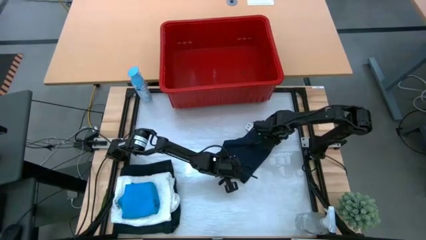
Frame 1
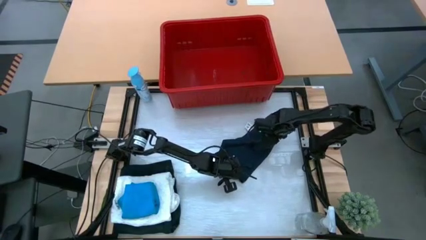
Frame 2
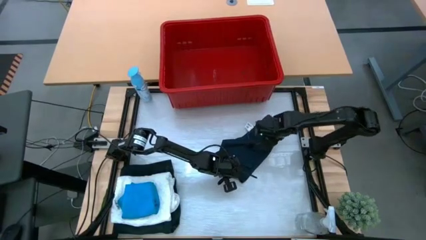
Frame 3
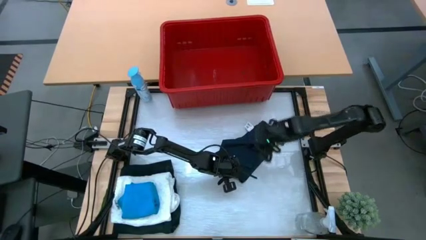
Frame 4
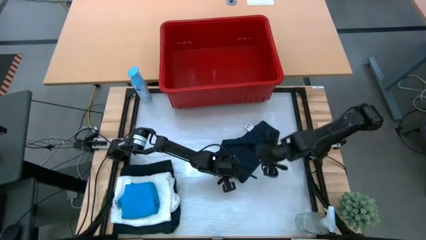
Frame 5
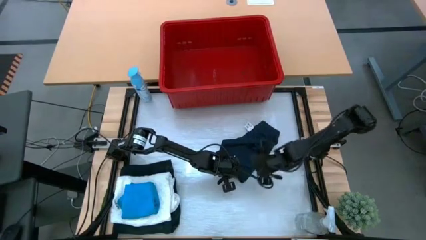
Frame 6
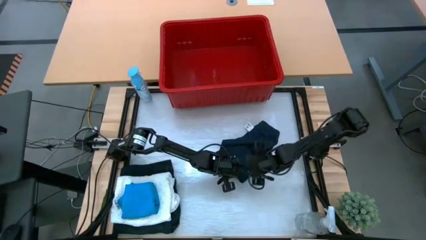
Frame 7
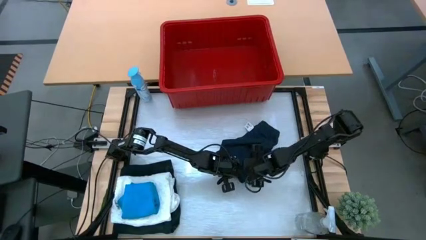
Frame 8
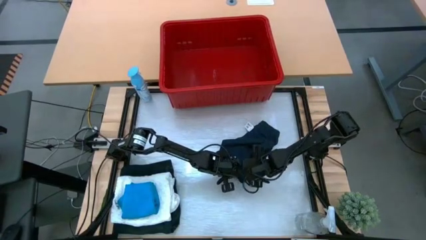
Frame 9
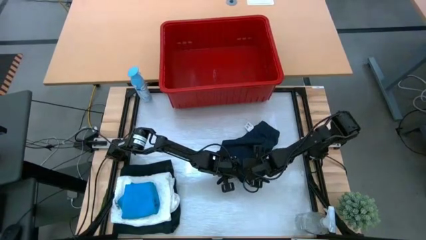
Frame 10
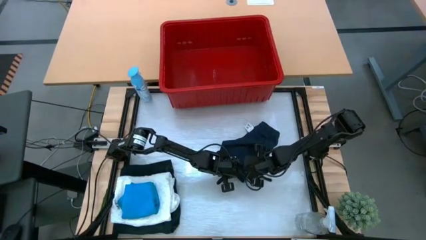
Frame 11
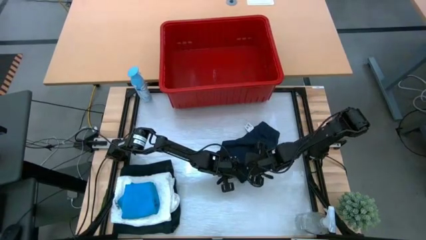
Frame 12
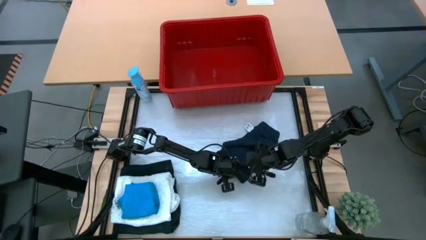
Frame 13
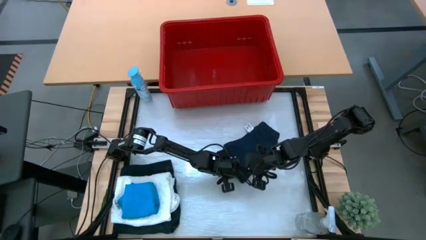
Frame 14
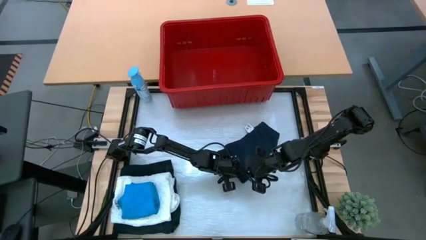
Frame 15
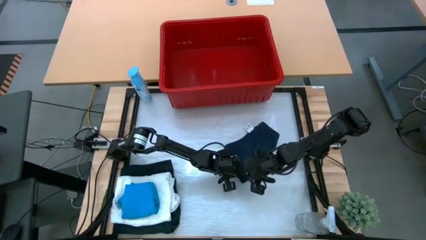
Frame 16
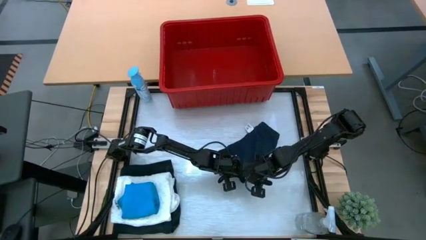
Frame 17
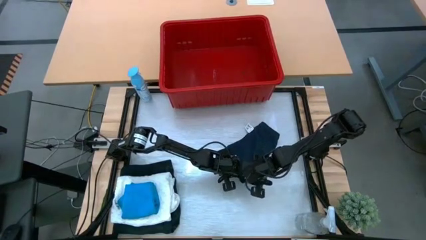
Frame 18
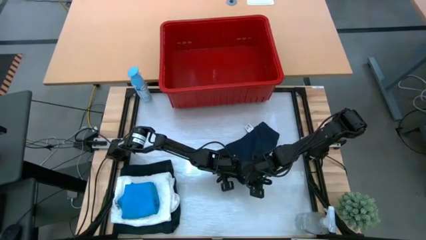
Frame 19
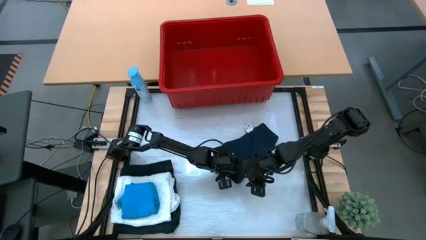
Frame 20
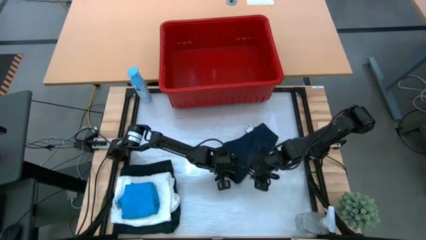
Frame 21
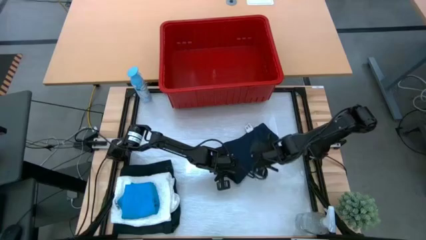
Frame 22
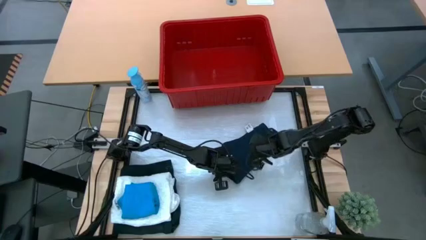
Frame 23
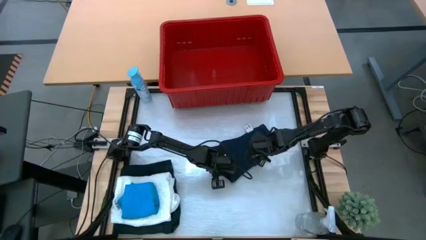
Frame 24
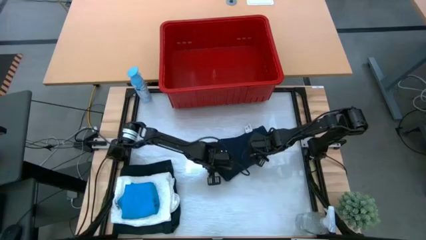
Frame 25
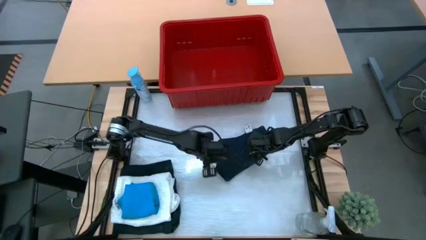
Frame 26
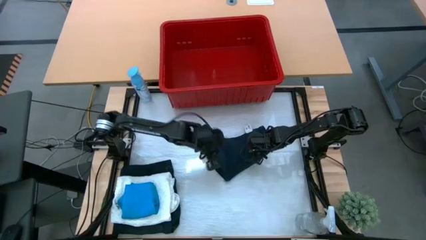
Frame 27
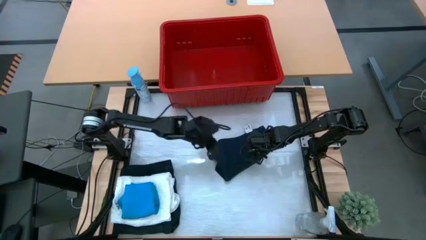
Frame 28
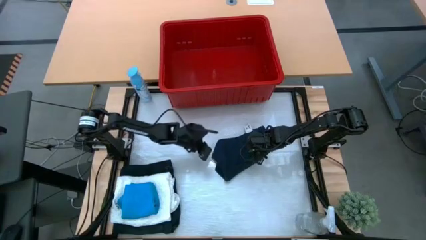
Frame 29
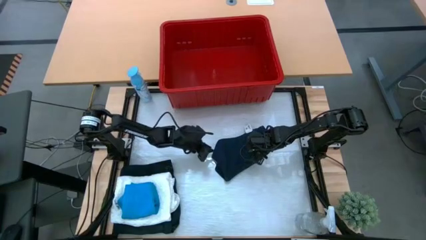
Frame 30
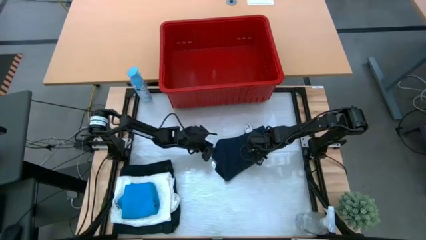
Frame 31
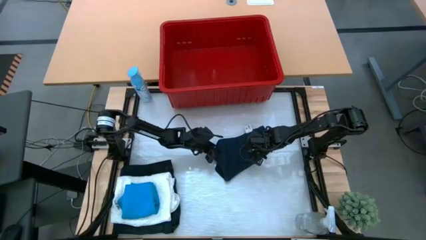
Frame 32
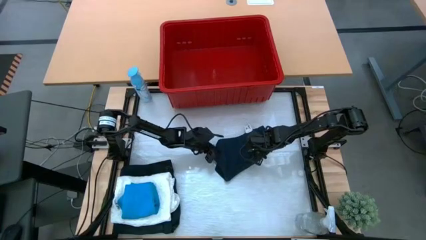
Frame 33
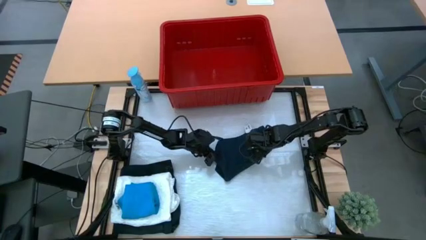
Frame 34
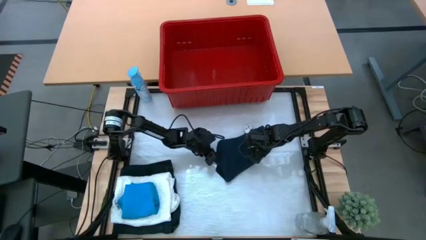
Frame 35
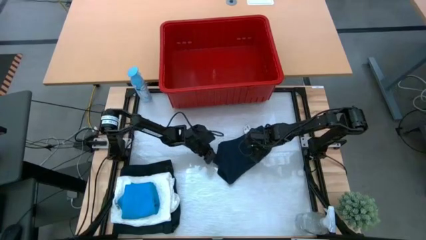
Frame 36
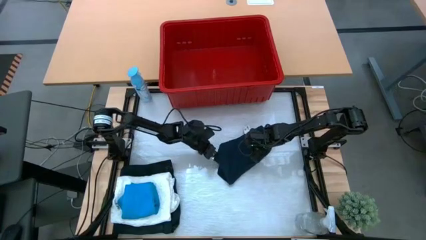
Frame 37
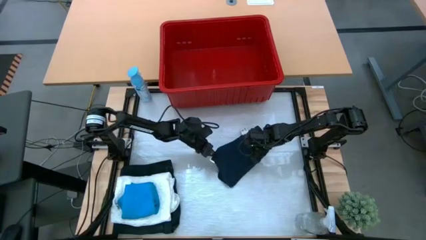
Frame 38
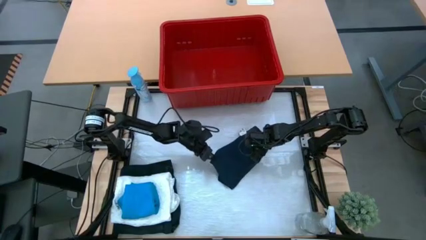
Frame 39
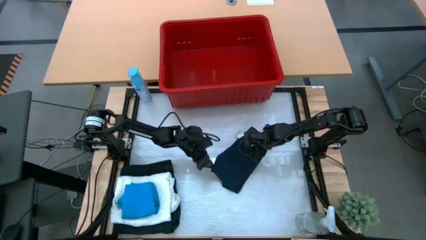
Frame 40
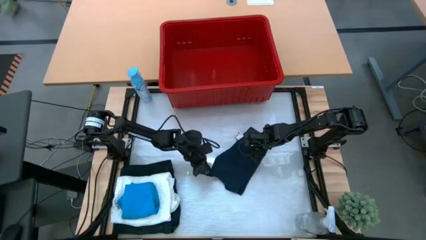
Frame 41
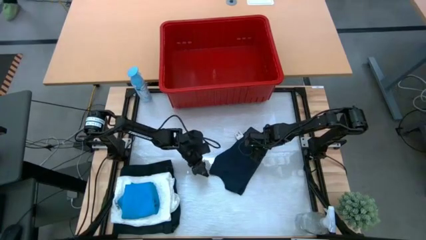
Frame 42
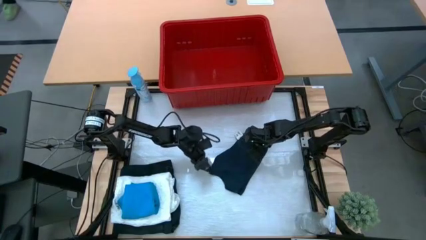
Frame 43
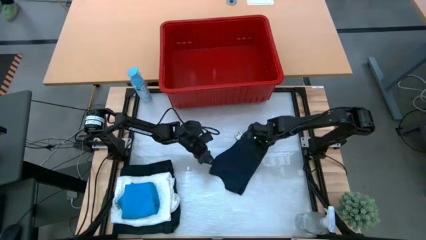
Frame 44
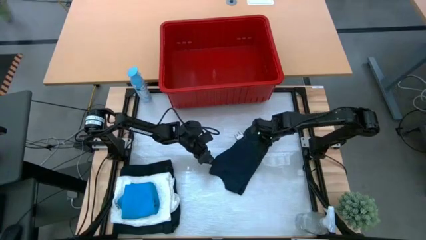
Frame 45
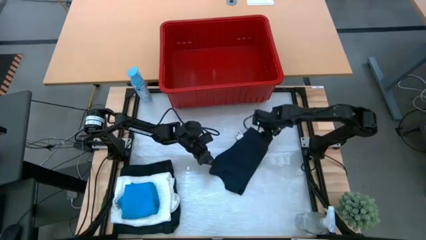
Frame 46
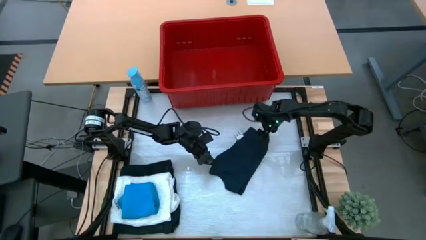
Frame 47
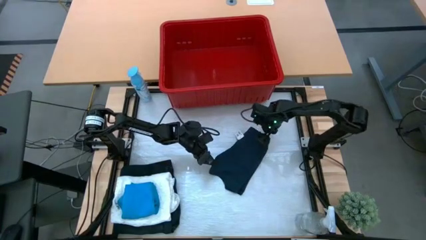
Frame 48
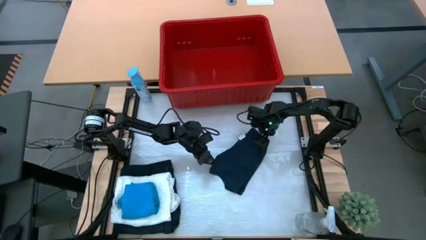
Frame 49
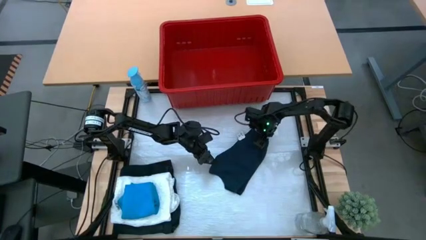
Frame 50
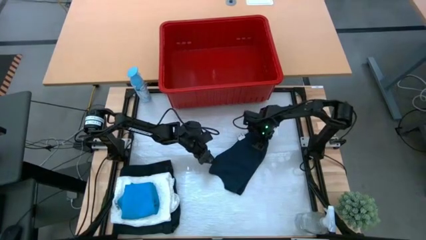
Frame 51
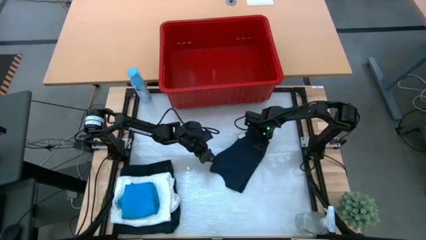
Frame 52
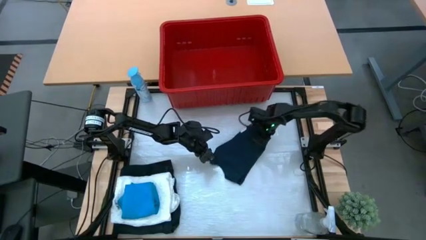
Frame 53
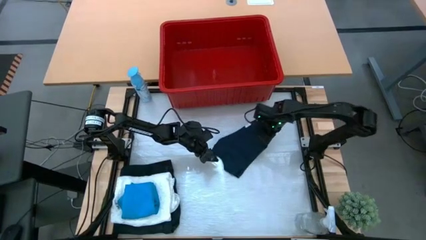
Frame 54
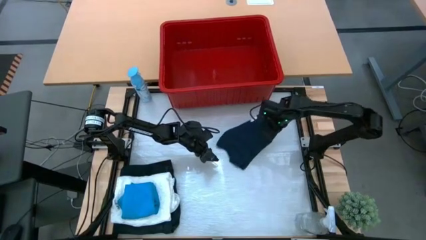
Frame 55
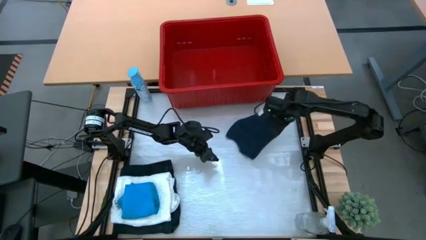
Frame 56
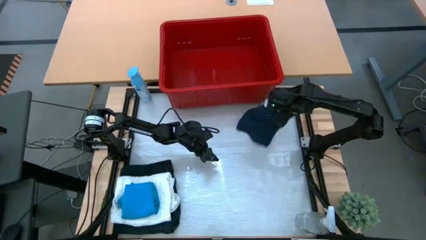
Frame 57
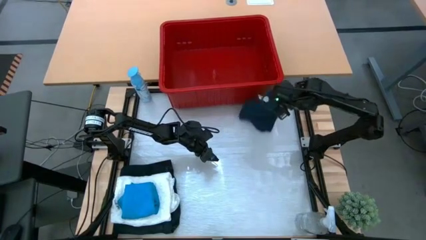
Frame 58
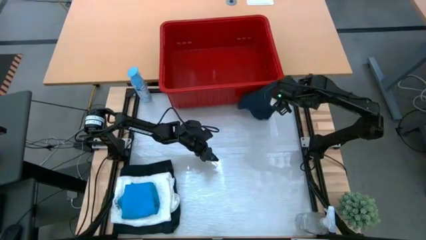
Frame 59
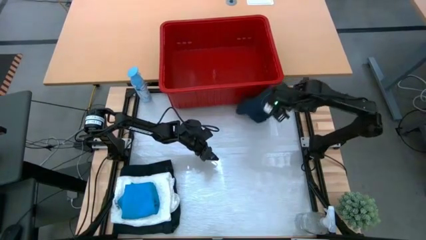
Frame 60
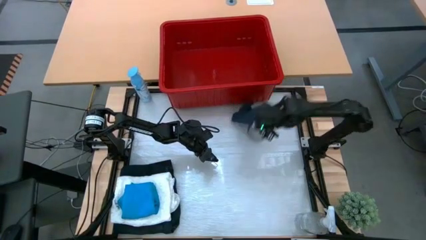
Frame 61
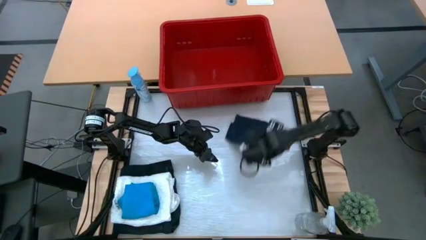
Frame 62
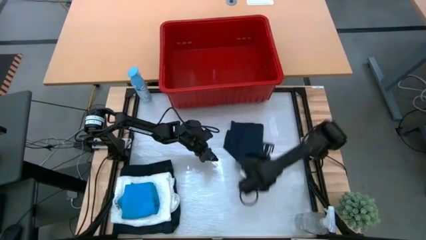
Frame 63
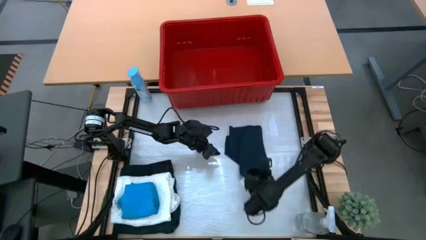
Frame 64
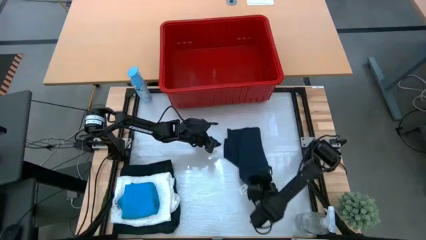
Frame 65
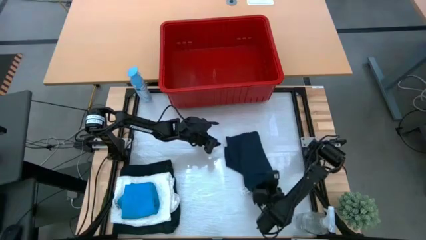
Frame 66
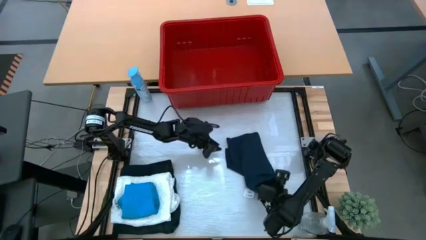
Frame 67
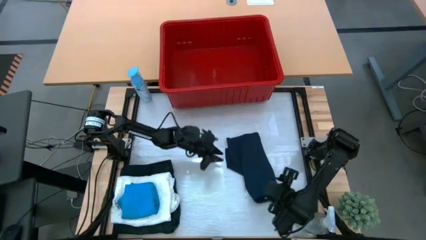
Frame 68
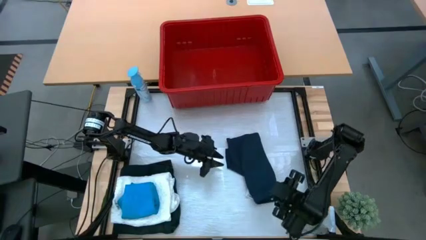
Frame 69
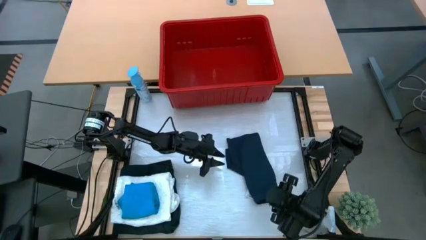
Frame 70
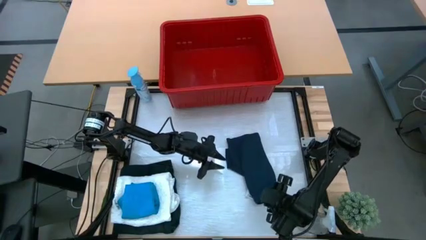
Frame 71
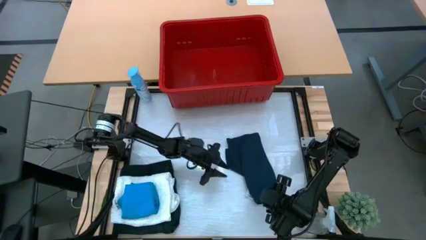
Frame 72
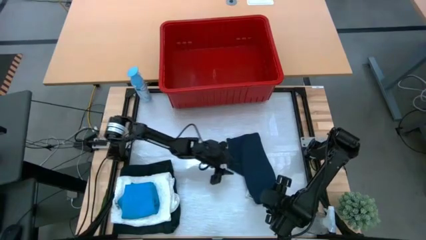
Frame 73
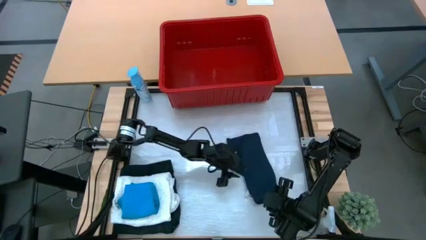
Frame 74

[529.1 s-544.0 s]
Task: Fold Laundry from Bin
Fold the gray shorts from the red bin

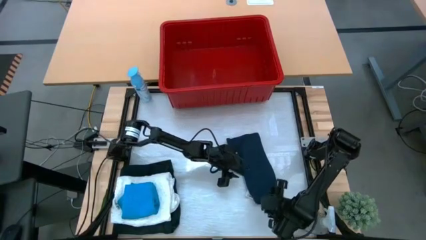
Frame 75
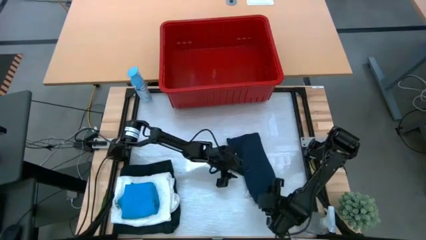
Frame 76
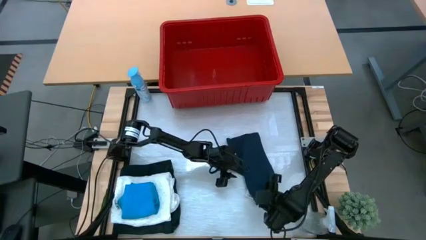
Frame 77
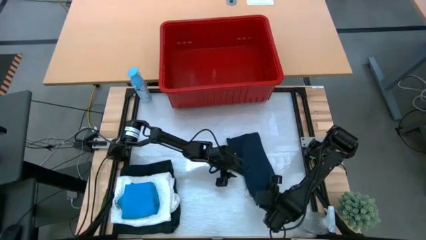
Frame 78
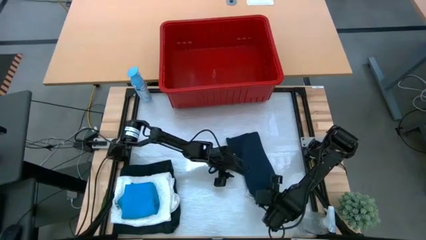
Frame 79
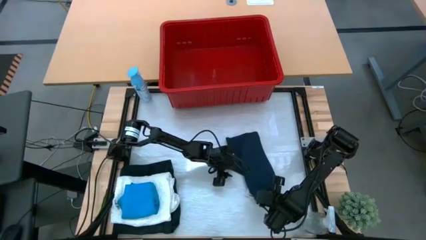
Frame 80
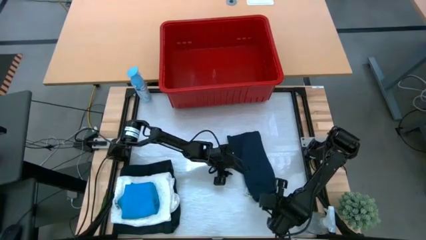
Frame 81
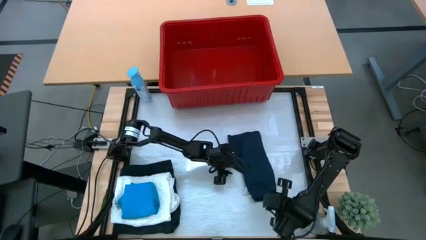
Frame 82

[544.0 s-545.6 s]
Fold the gray shorts from the red bin

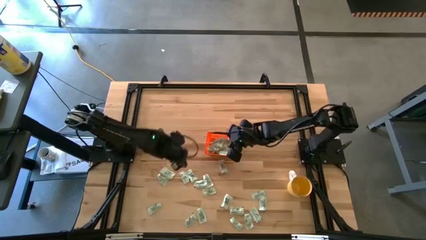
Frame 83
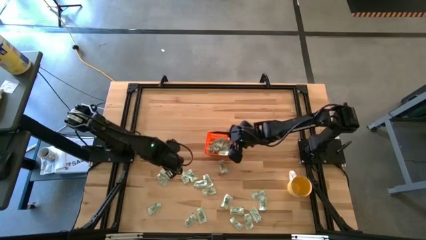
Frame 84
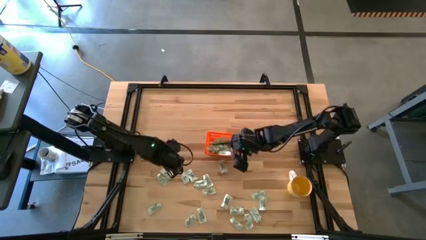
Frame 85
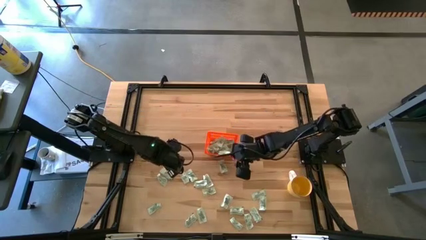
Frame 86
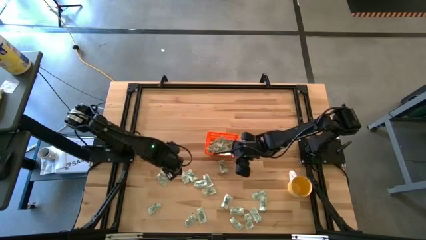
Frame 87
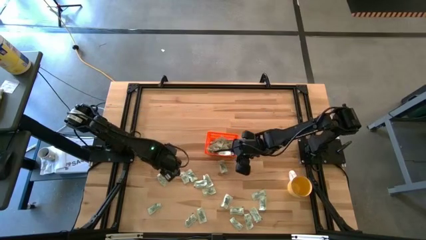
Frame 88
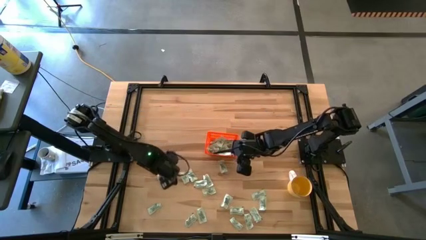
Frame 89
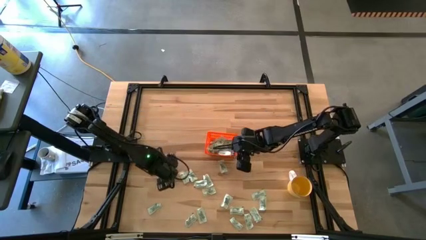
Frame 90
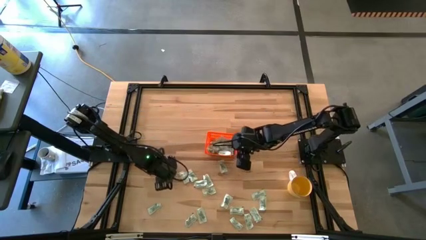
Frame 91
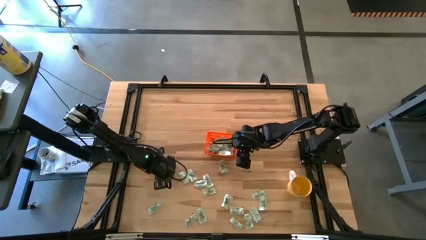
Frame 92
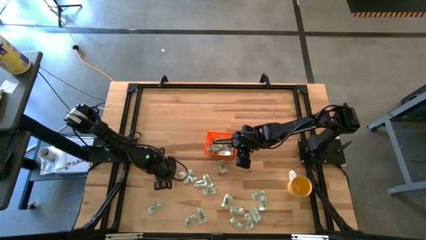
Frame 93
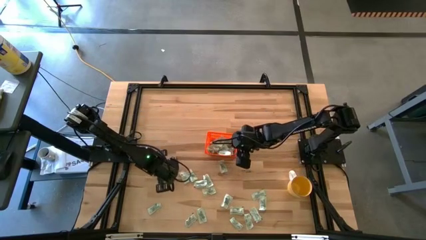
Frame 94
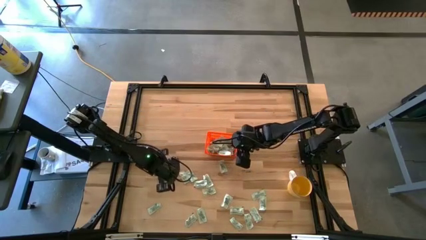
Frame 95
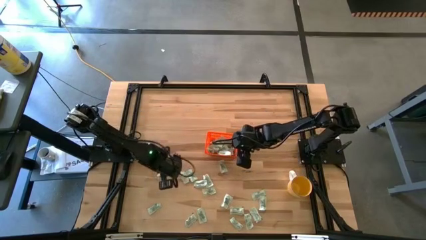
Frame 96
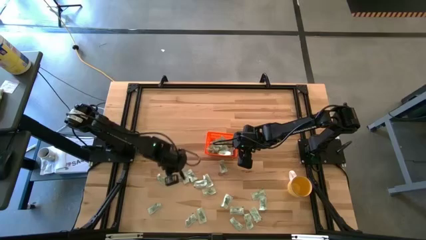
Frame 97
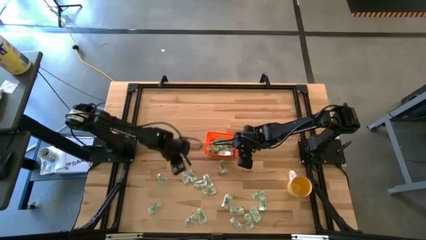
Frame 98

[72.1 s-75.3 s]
Task: Pick and place Stevia / Truvia into bins
Put the light green stevia packet into the orange bin
